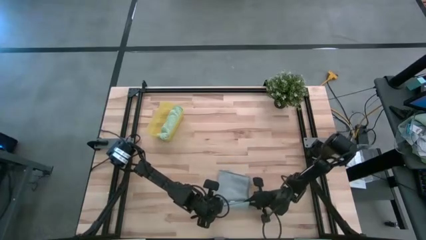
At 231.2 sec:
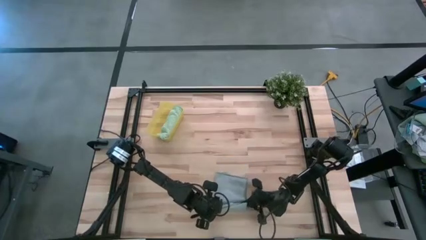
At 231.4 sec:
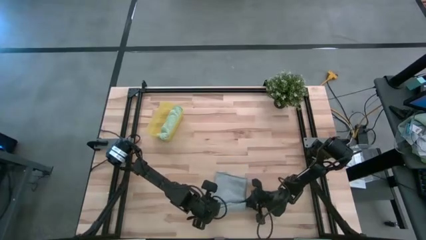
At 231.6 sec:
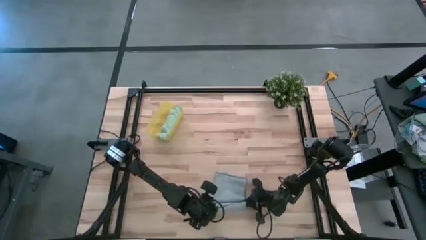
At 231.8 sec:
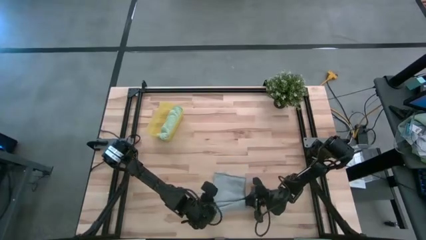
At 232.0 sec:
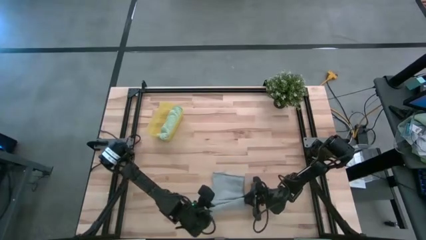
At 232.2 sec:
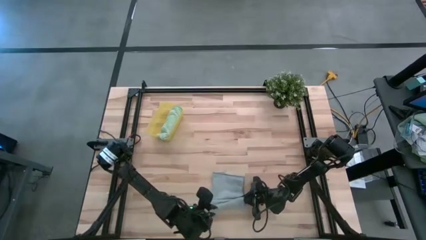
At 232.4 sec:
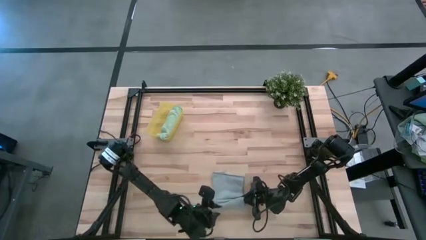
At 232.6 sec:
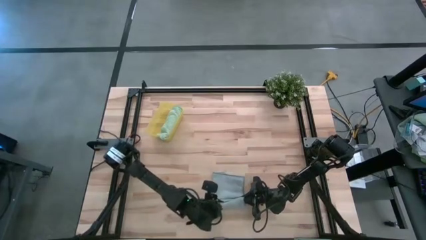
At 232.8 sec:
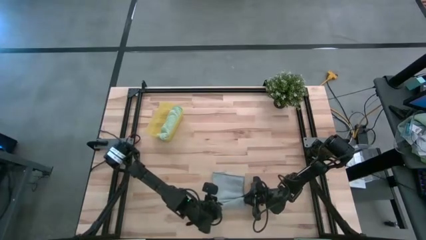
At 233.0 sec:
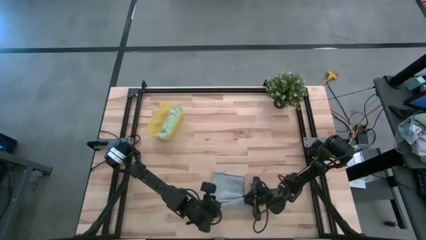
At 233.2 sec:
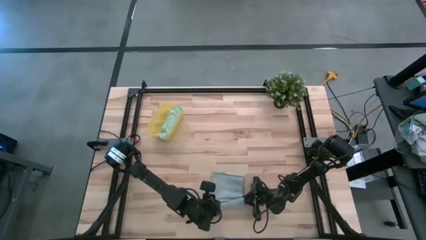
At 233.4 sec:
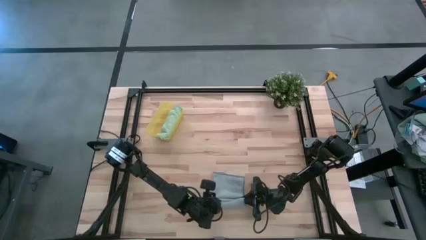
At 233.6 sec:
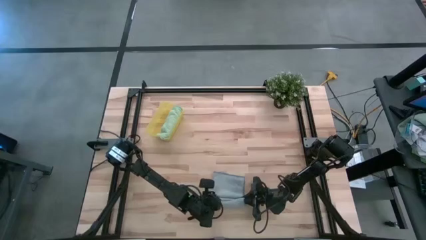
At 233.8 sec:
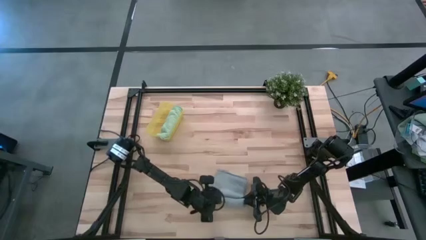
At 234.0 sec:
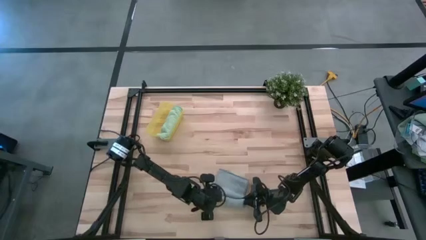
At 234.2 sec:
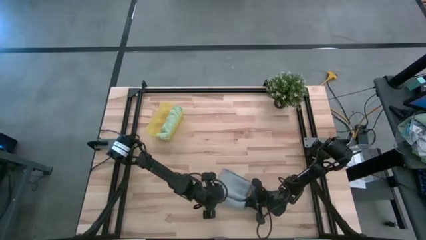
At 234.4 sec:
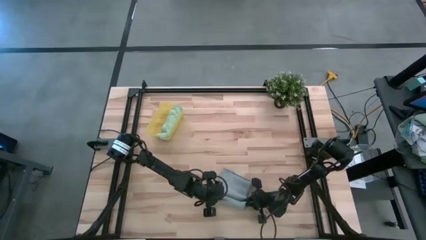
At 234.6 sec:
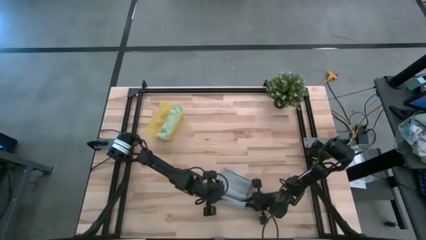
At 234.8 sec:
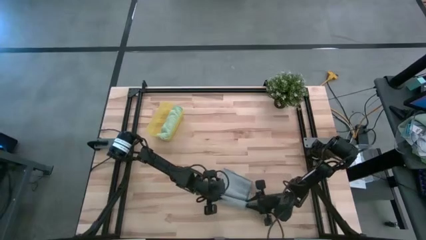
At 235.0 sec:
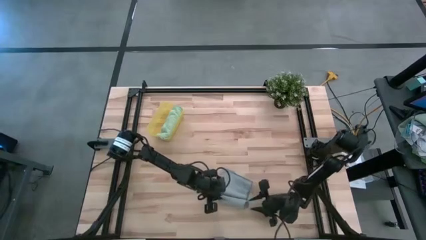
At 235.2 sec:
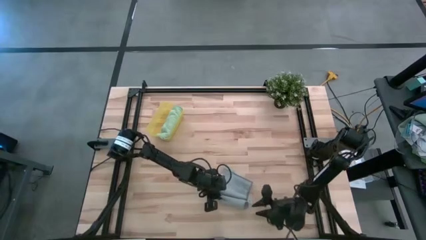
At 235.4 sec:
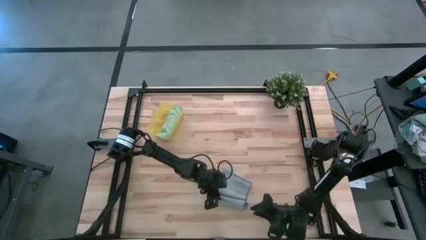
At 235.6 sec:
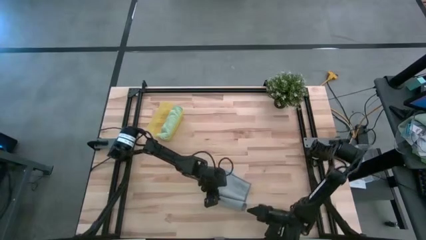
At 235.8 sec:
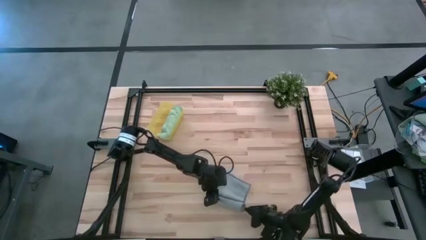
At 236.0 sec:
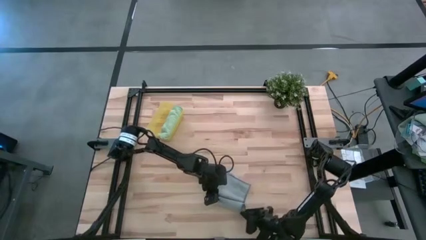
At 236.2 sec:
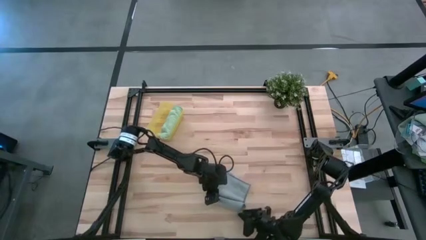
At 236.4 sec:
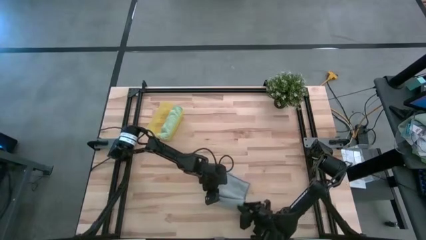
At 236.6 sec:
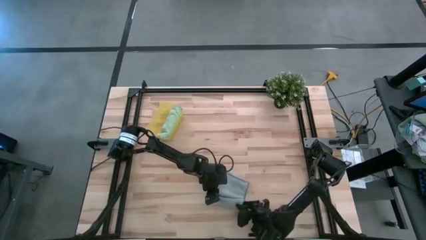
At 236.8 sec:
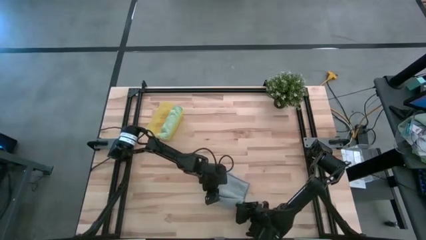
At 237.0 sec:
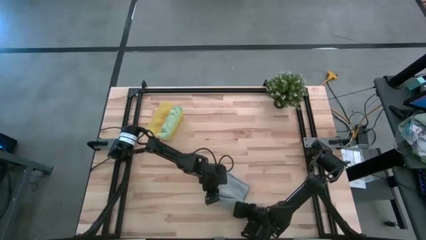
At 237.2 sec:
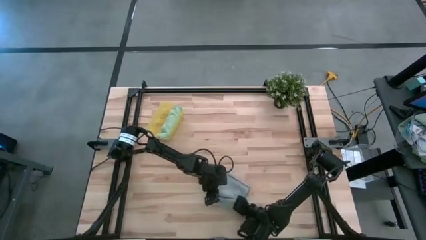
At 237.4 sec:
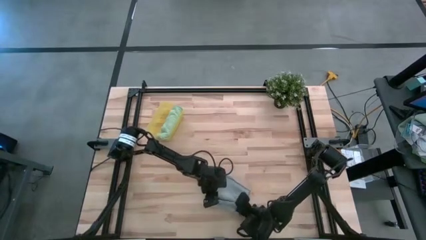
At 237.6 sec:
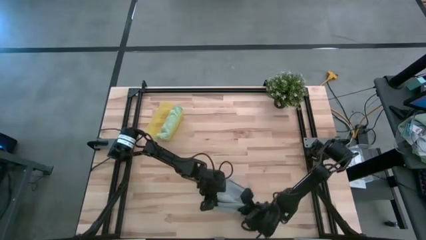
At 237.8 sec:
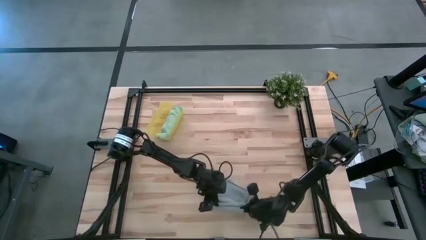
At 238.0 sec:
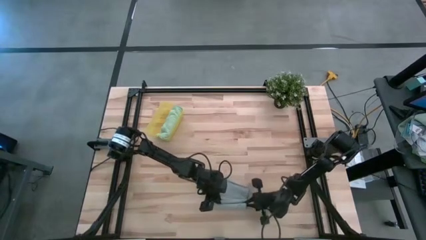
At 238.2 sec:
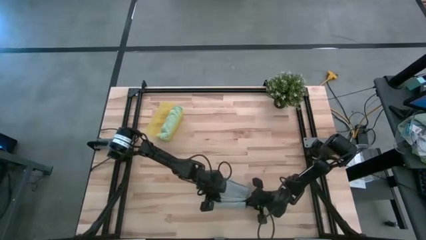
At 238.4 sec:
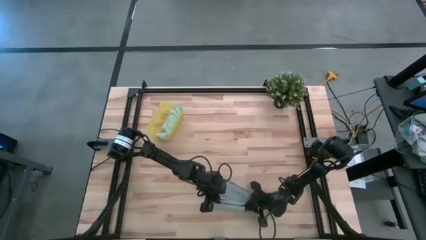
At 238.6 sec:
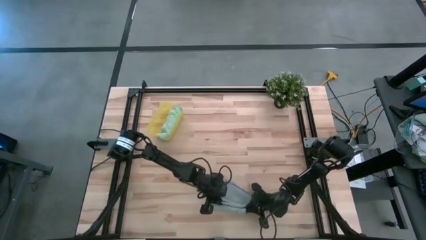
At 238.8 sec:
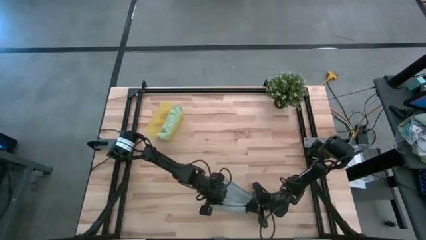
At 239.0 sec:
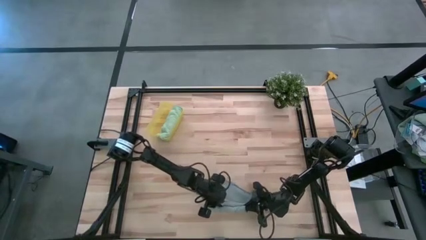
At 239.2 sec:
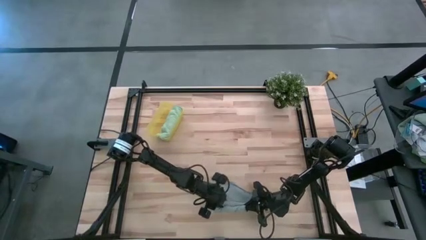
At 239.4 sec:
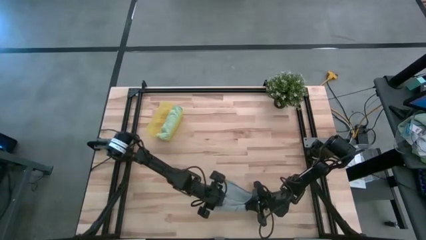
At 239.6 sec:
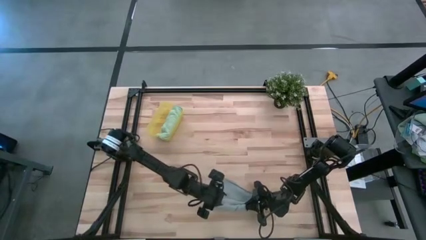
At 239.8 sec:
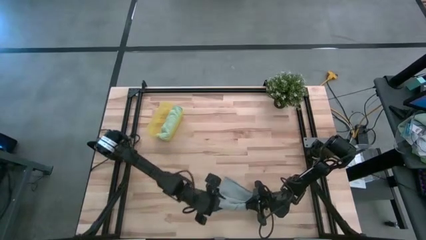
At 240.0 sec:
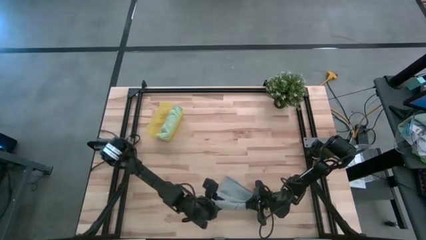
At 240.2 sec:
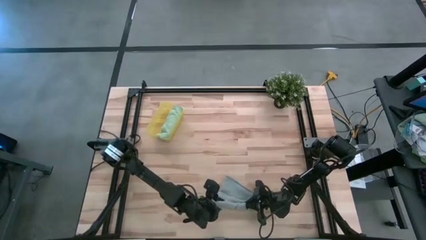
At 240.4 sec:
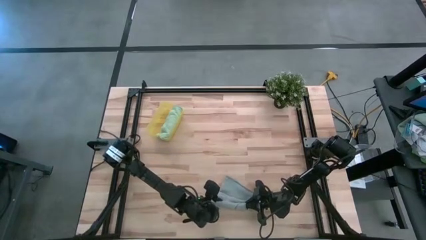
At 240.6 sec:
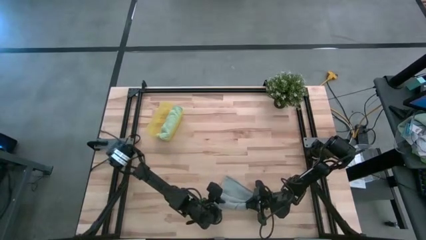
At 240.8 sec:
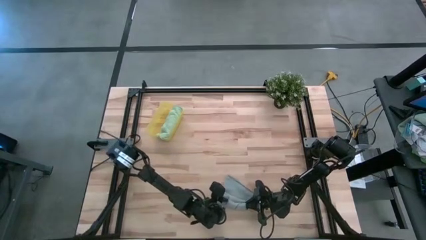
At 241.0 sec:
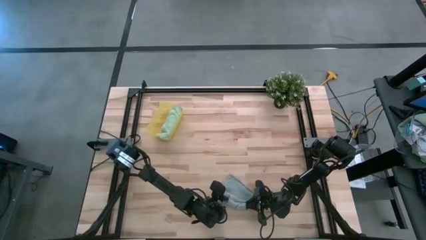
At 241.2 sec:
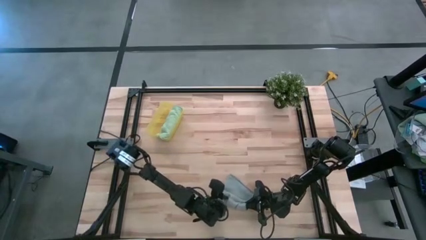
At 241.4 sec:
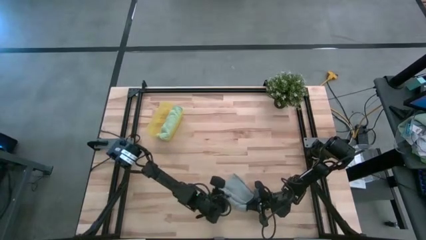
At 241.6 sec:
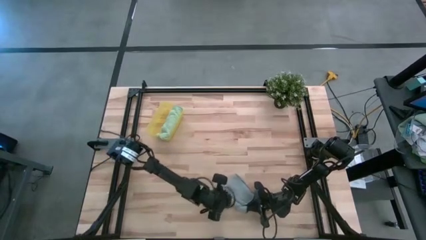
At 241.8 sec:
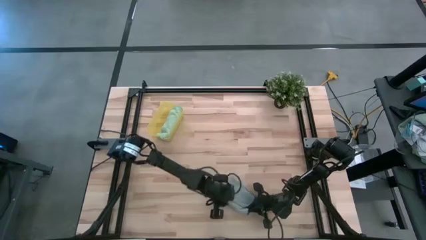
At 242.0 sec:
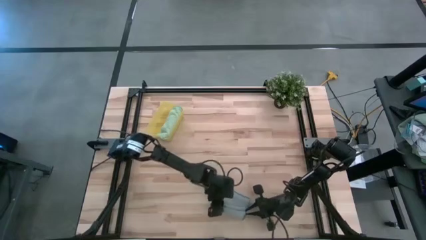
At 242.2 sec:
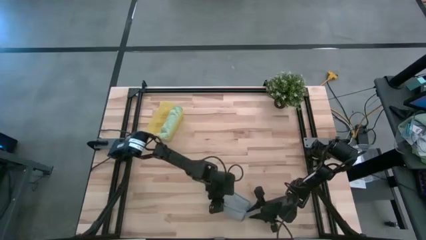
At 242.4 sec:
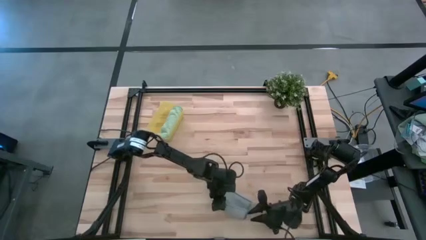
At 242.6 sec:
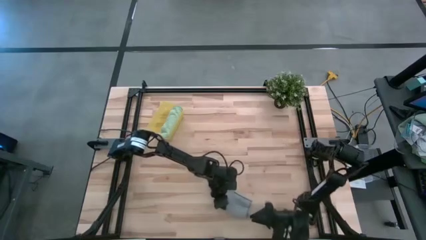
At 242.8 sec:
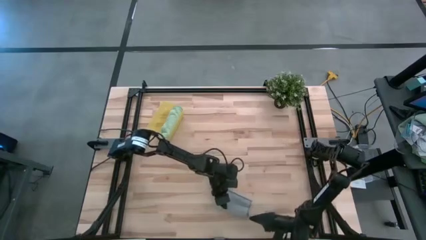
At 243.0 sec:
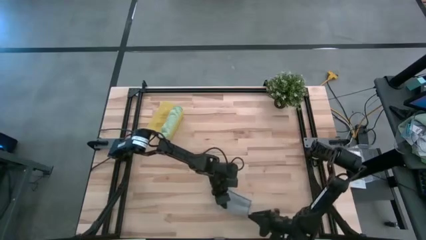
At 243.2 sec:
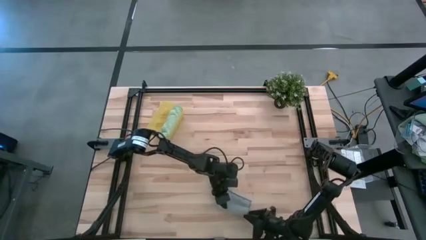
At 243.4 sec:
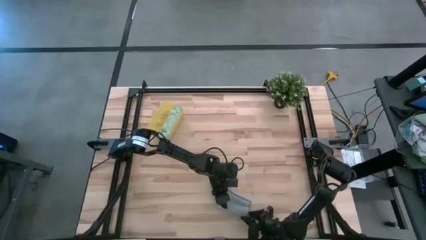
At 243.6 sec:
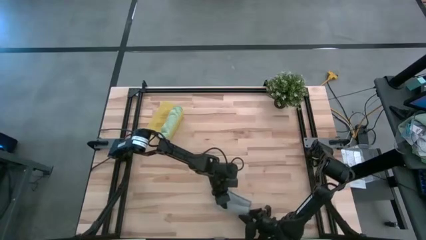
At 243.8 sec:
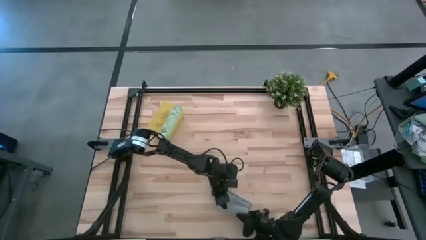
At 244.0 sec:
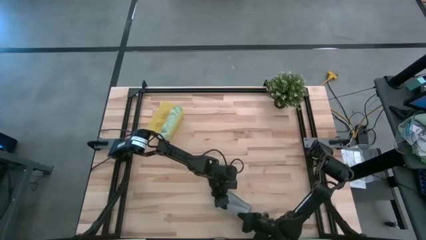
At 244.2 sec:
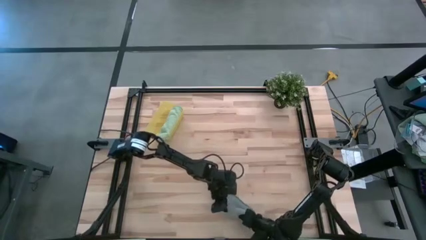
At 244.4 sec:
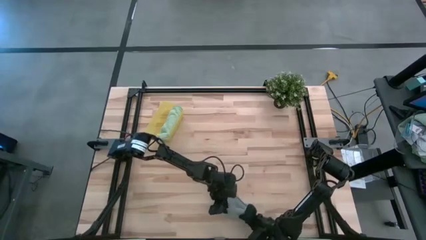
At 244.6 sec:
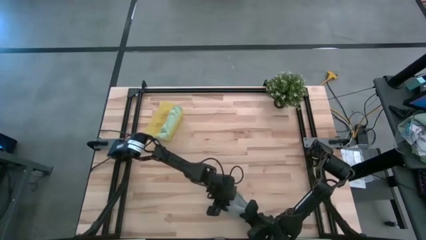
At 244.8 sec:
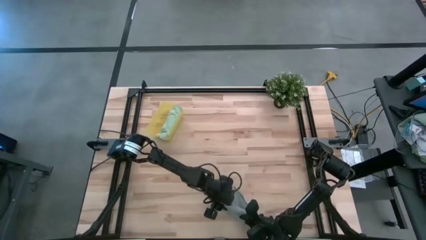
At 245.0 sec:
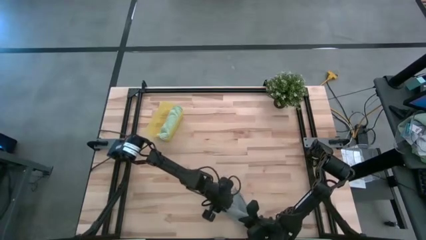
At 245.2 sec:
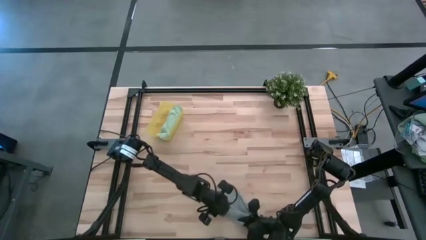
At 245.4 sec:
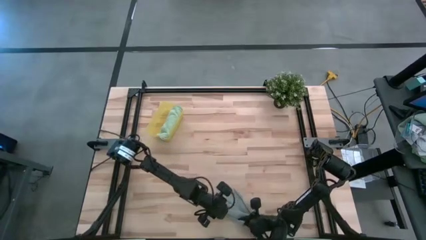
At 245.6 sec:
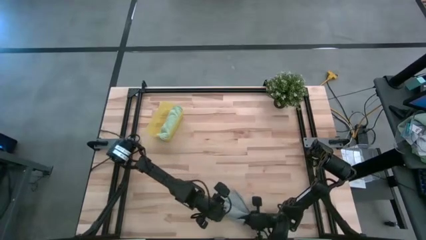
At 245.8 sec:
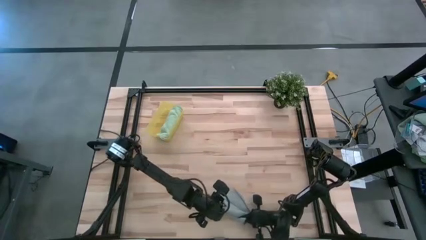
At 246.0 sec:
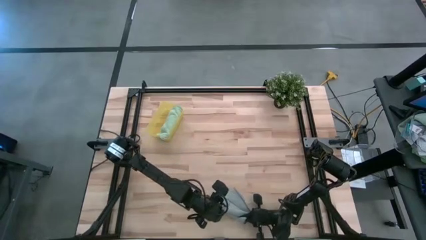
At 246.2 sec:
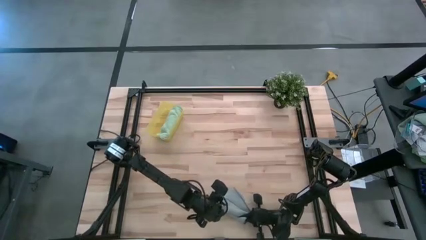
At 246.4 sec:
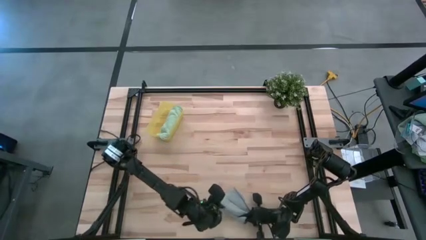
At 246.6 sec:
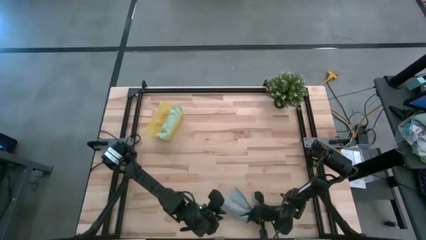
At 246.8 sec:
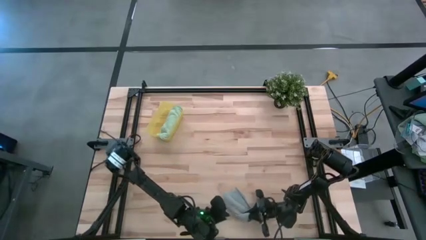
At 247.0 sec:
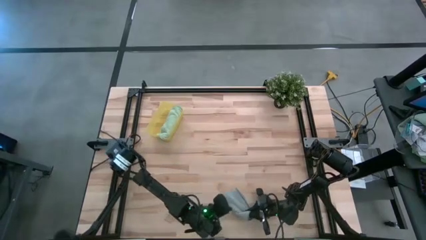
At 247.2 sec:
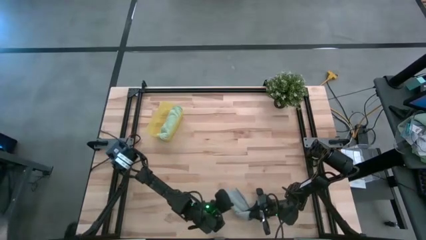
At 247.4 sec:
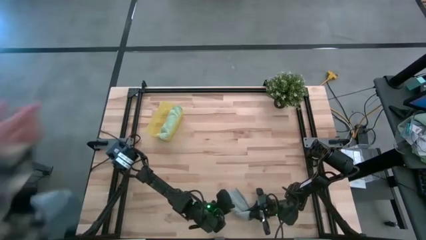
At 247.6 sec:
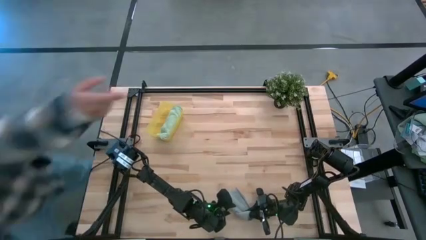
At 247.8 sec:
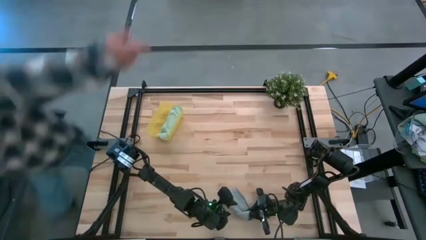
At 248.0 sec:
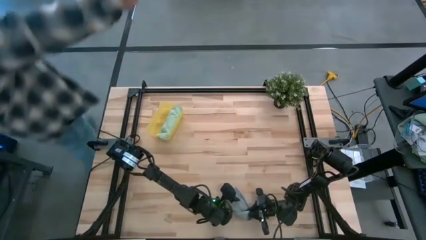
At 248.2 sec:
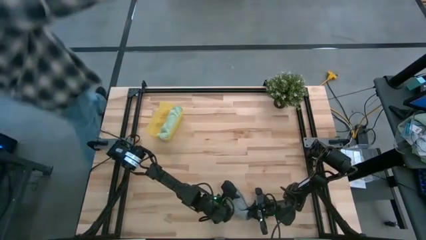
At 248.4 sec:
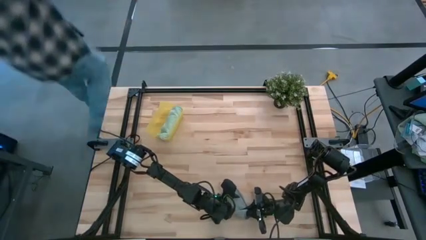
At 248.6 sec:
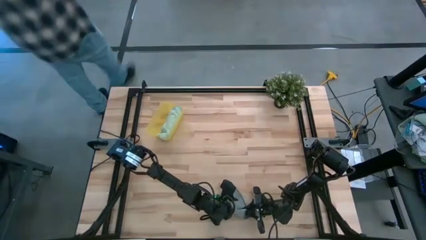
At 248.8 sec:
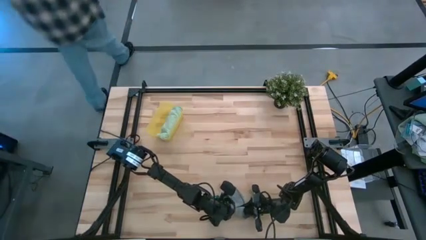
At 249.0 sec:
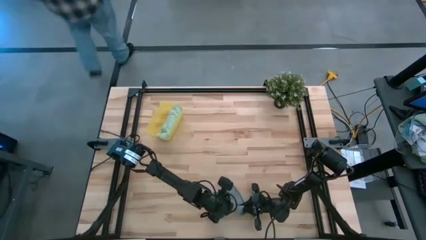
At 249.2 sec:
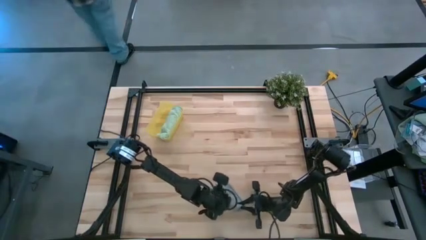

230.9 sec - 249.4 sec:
Task: Roll microfiber towels into tight, uniform cylinder then place into a basket
Roll the gray towel
